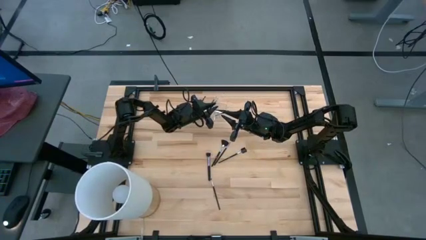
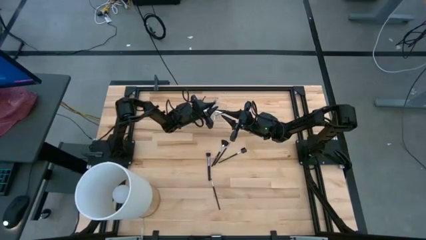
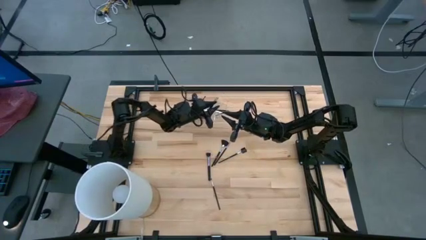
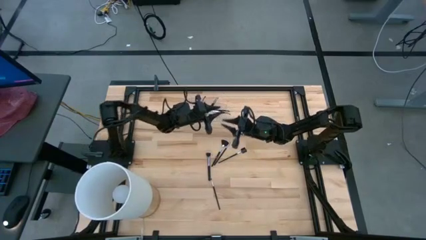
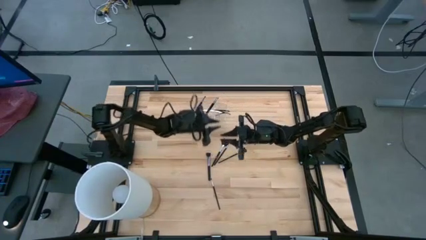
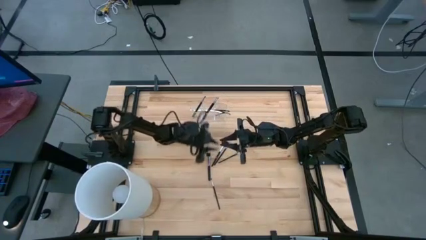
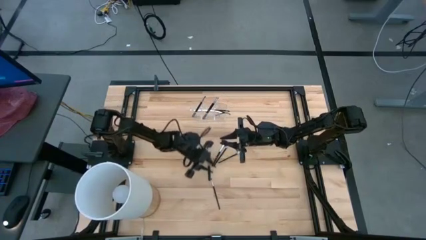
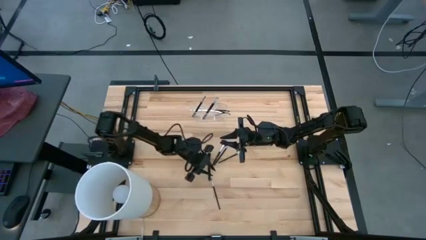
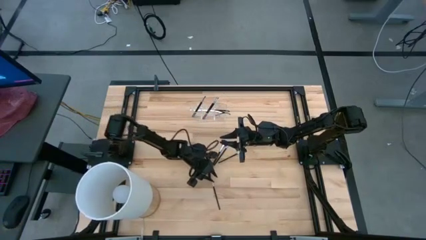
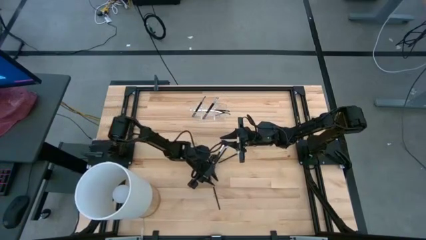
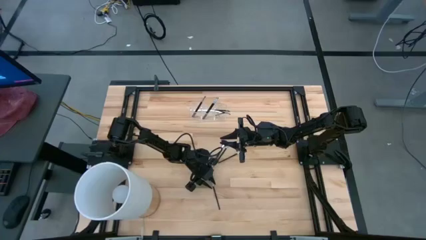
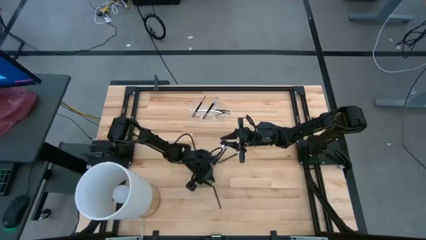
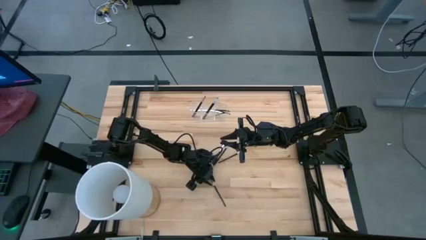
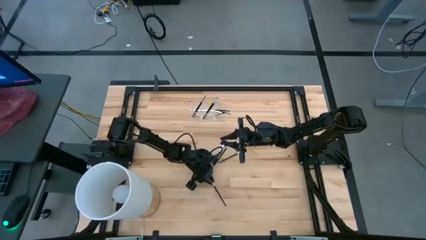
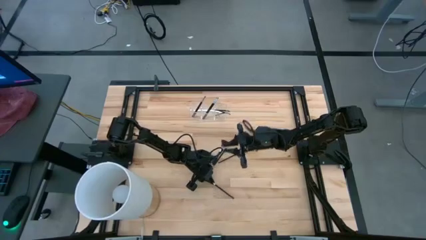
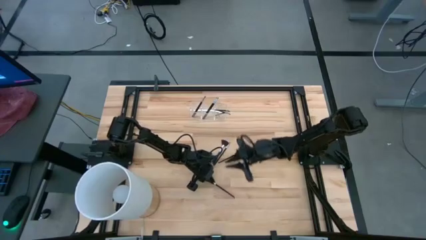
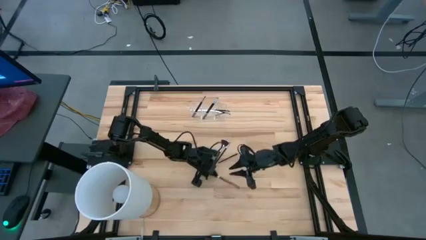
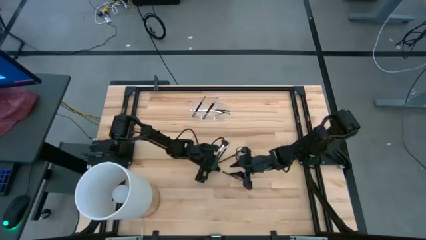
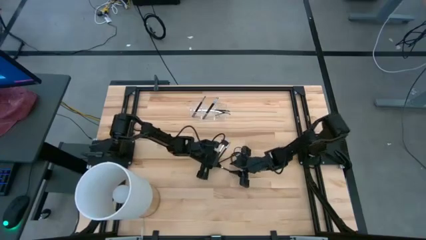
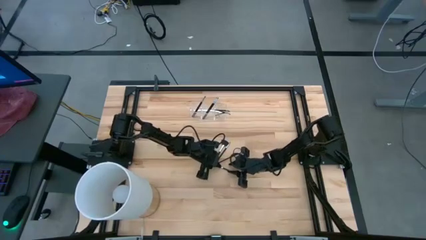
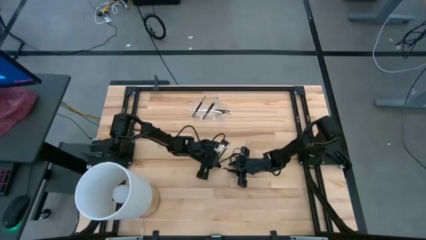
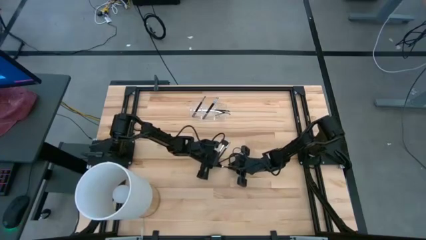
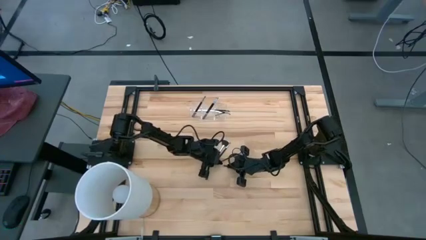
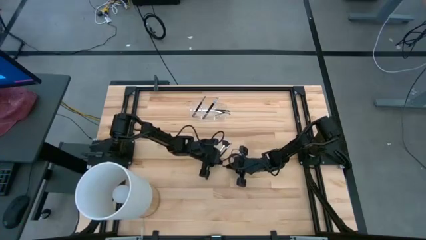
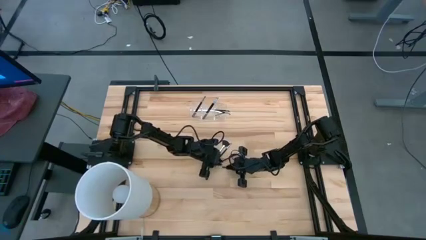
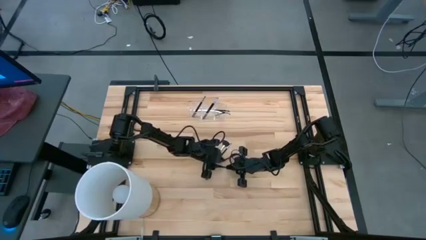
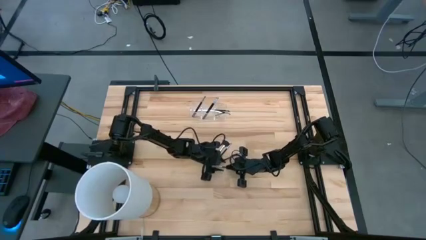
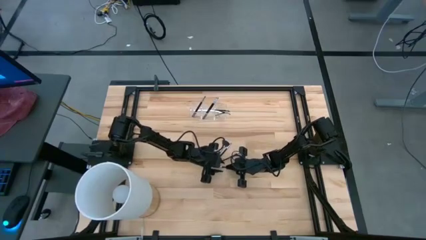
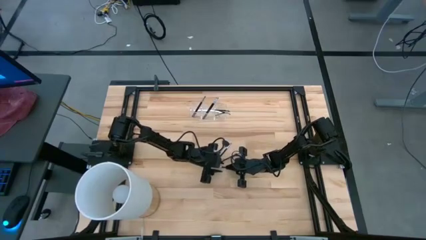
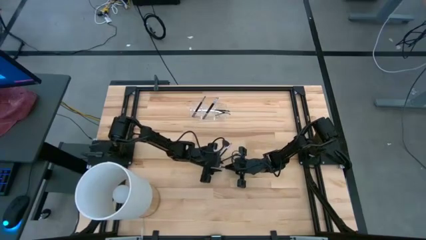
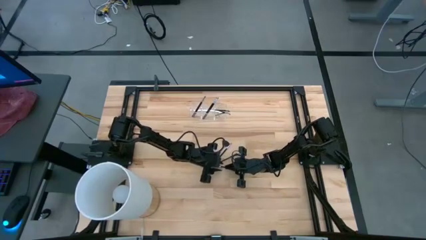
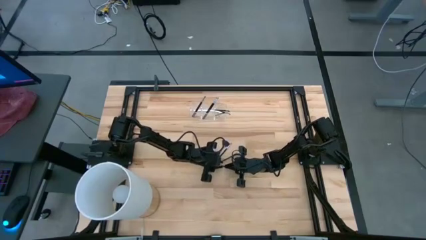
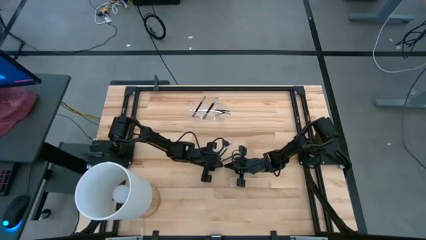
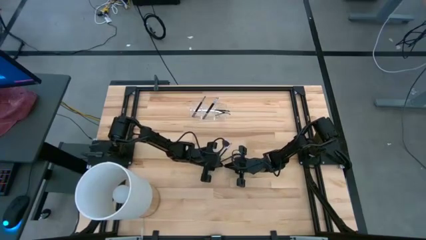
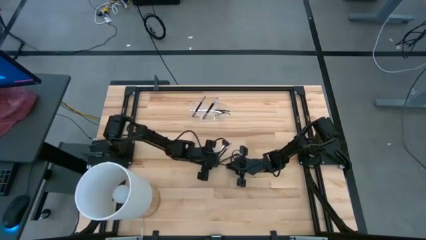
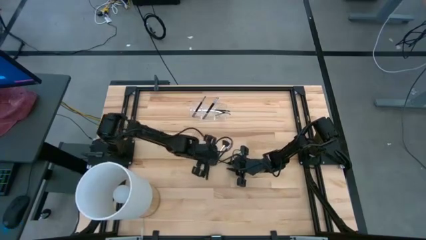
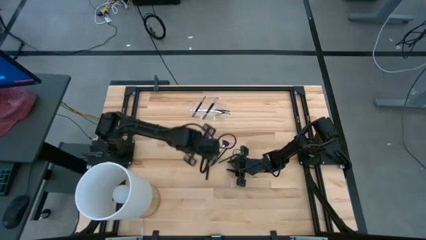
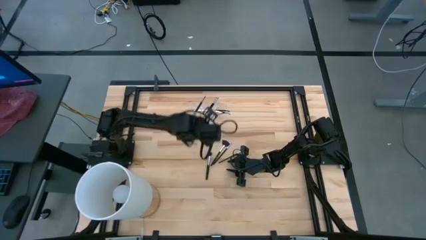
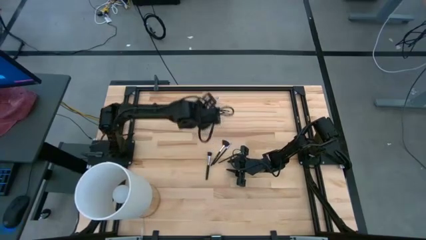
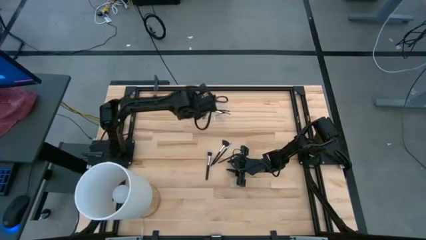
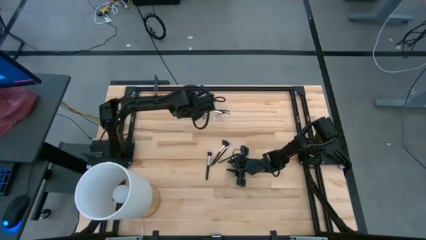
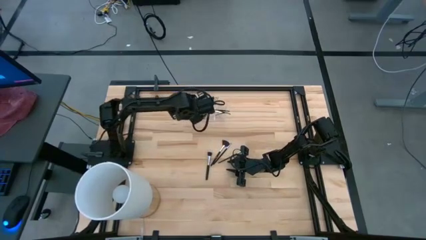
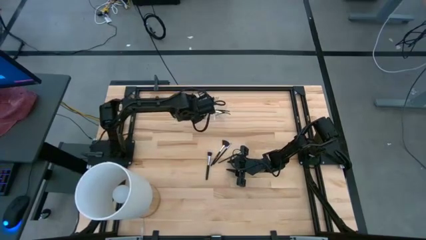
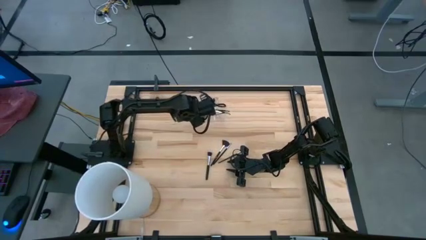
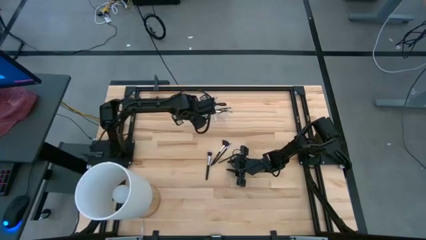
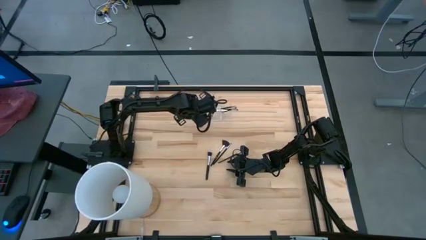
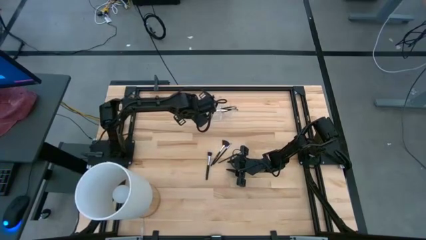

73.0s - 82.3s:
Task: Put items in baskets/containers
Put the black eyeshadow brush into the transparent organizer

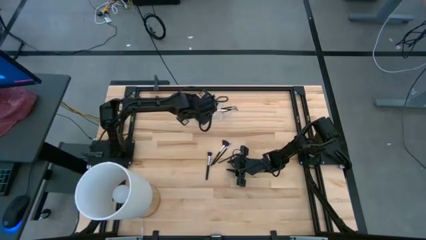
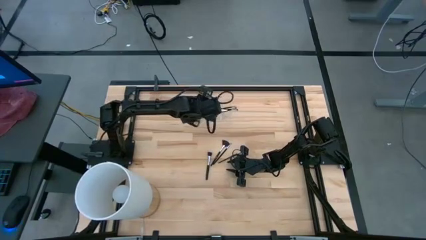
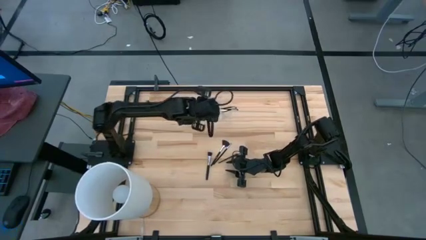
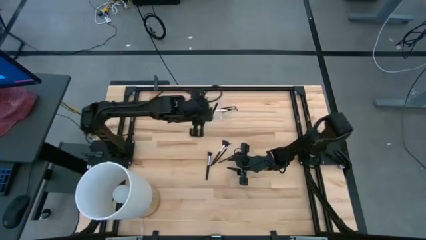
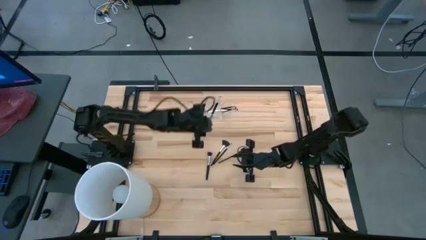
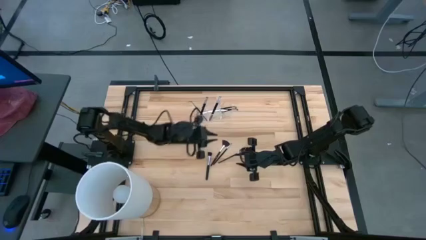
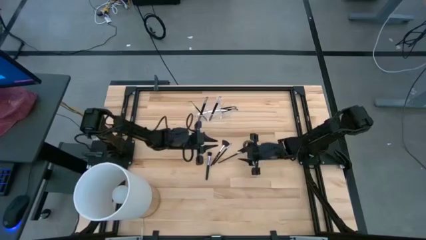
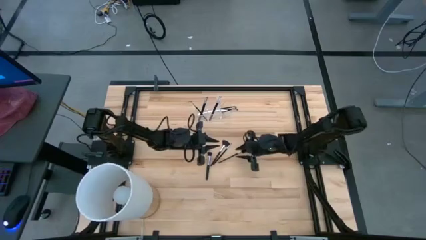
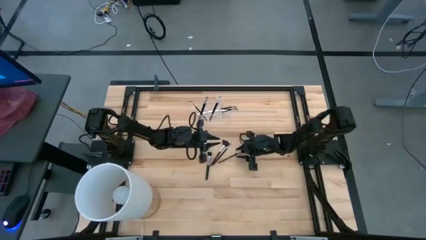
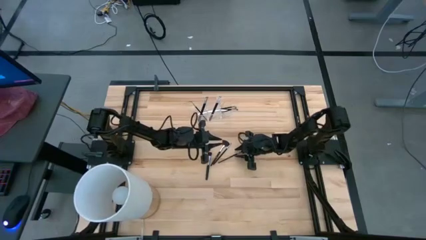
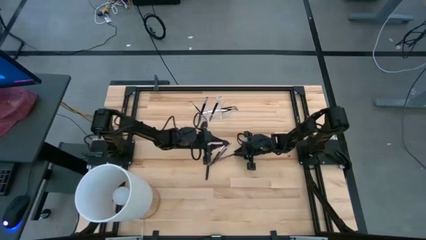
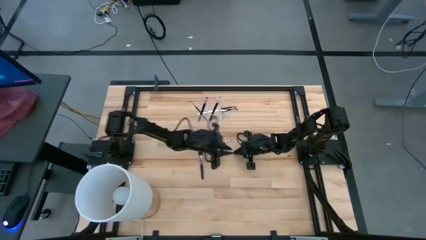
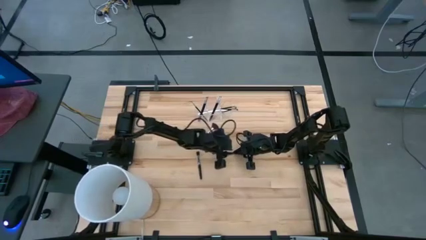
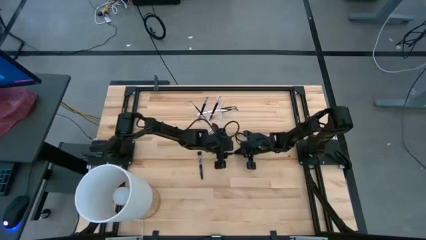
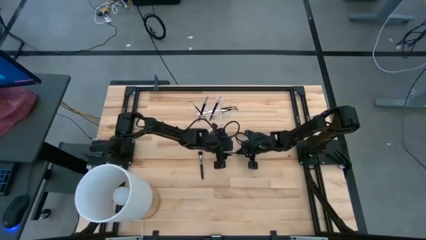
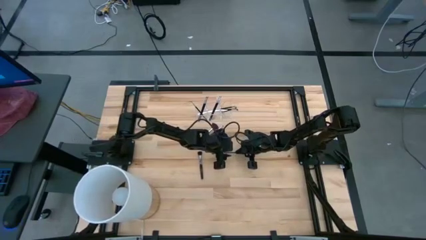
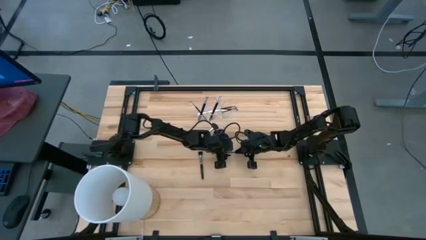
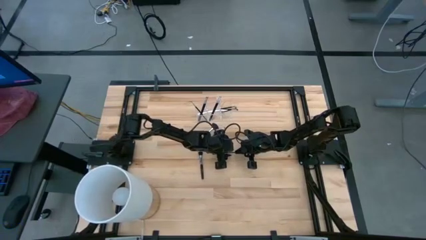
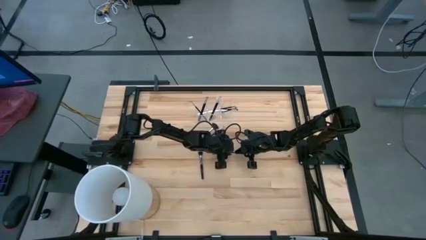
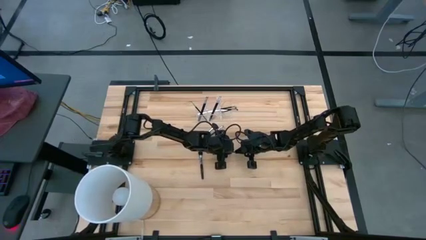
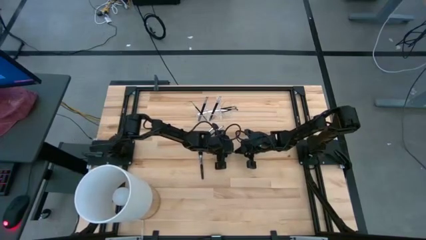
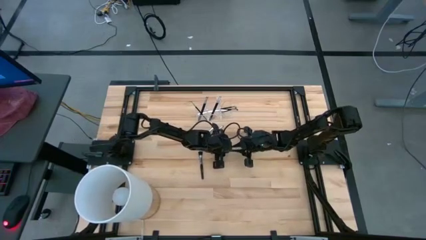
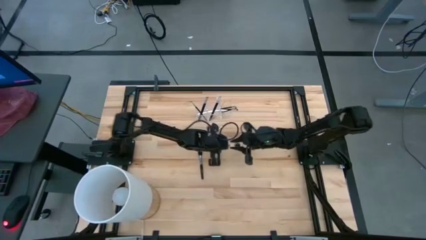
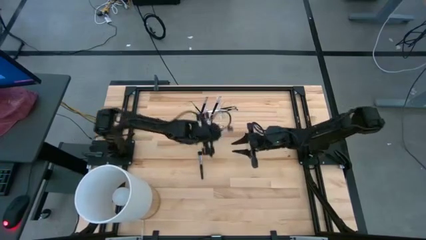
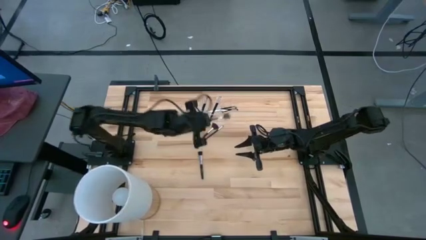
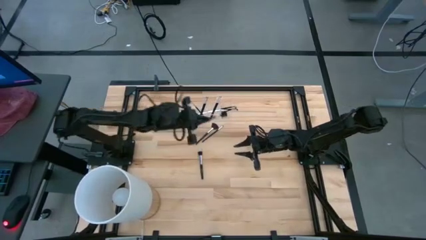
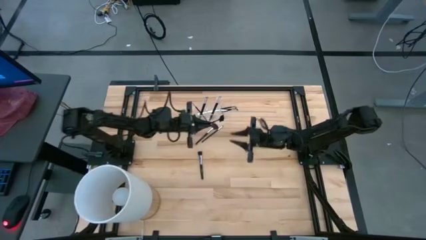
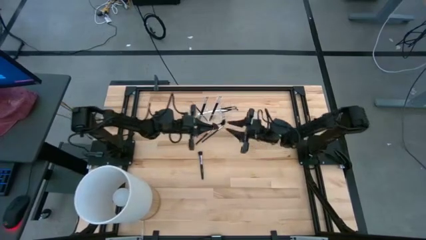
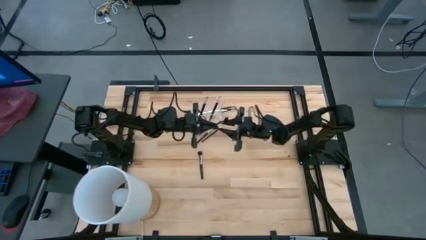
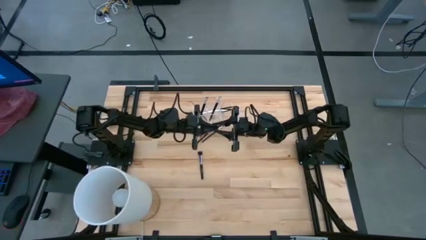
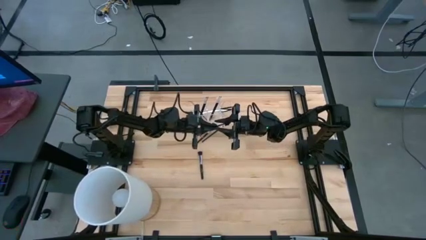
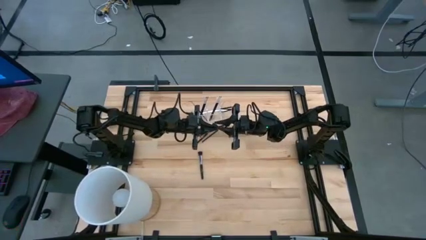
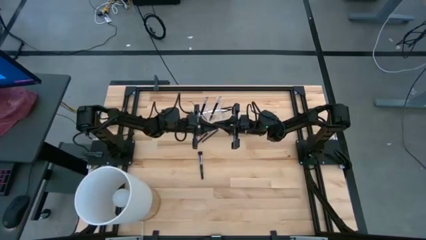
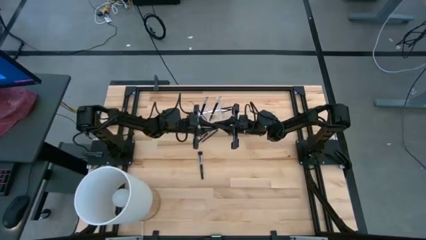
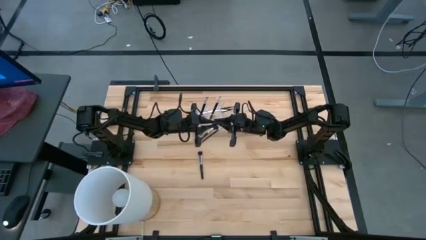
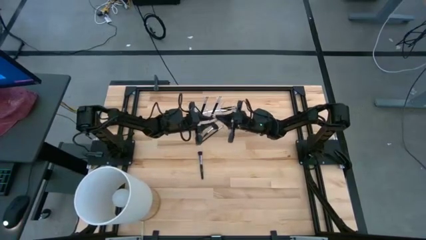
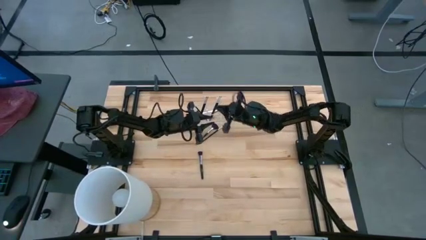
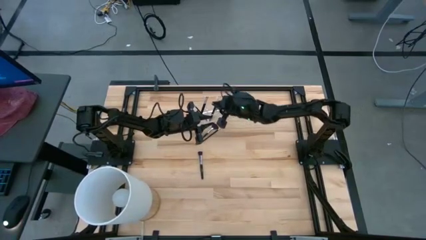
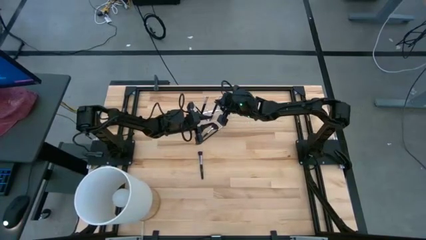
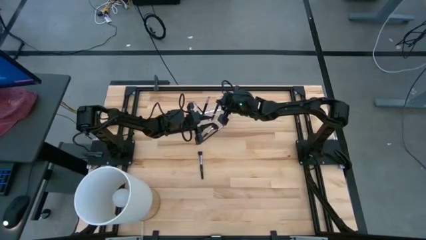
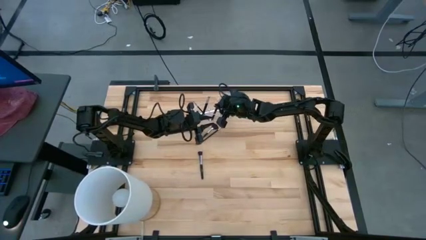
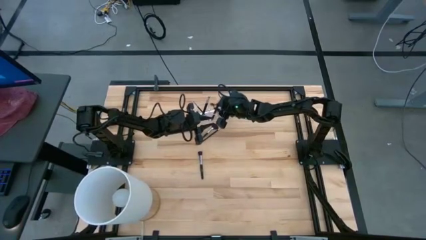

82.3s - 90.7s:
Put the black lash brow brush into the transparent organizer
